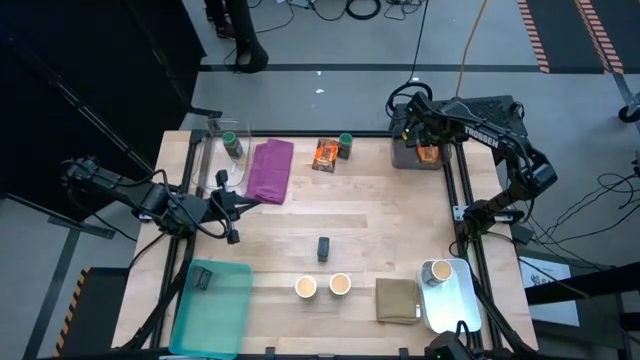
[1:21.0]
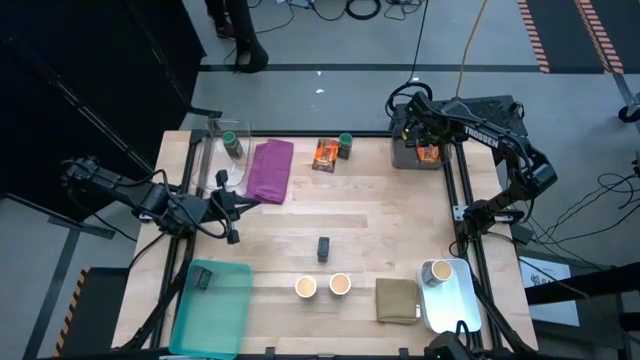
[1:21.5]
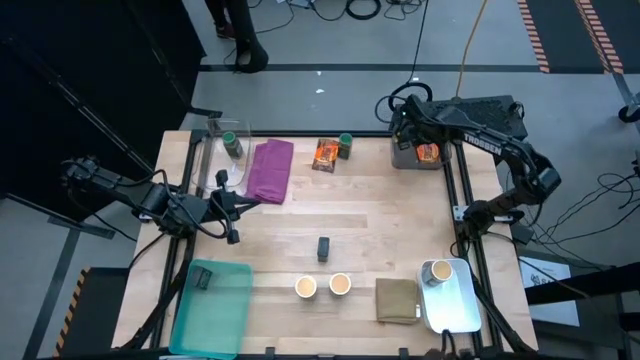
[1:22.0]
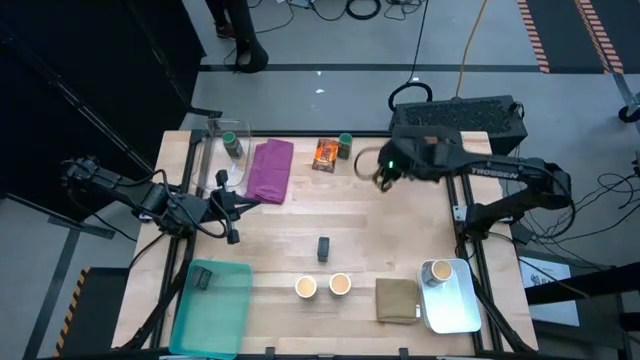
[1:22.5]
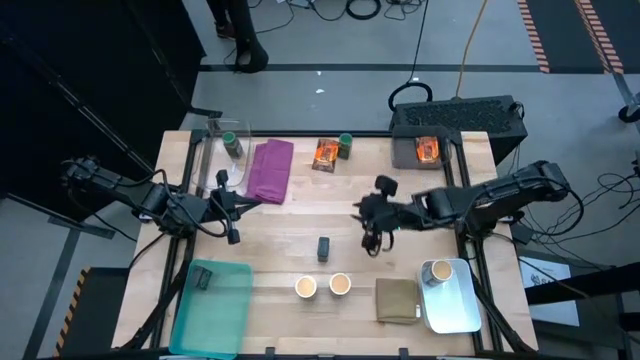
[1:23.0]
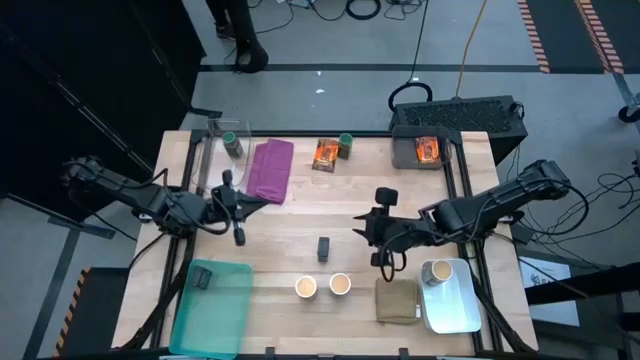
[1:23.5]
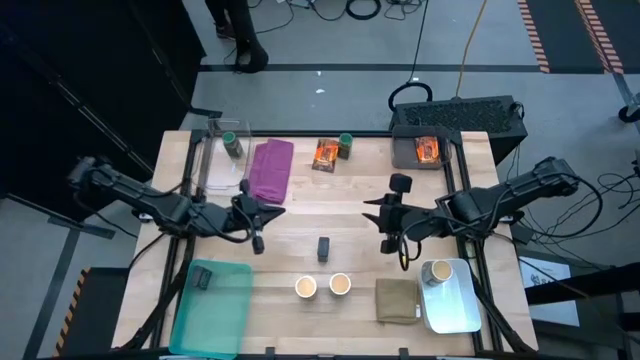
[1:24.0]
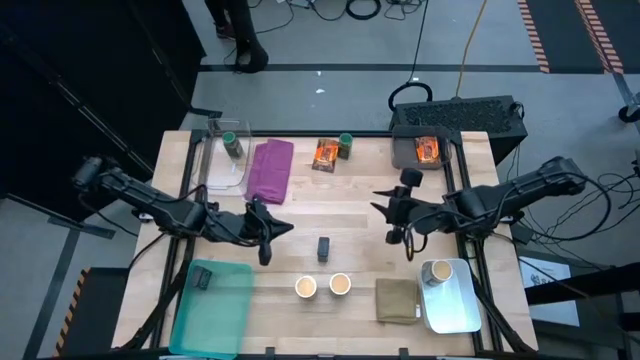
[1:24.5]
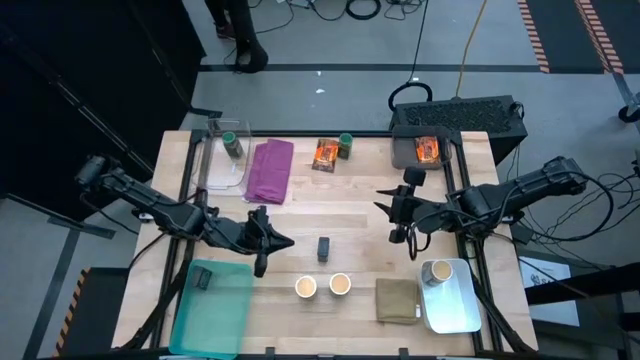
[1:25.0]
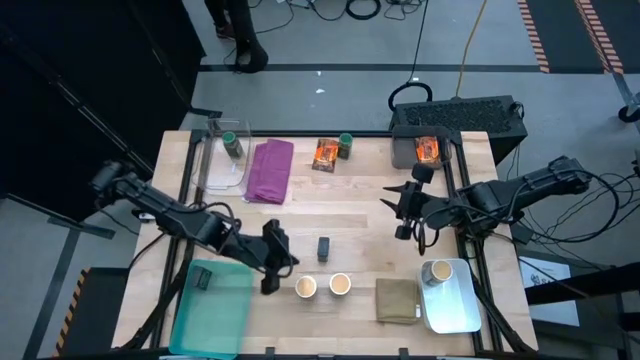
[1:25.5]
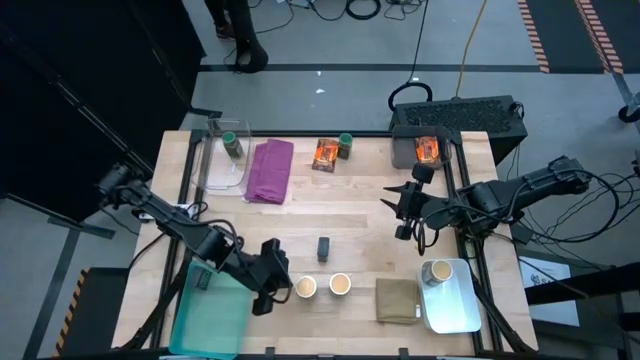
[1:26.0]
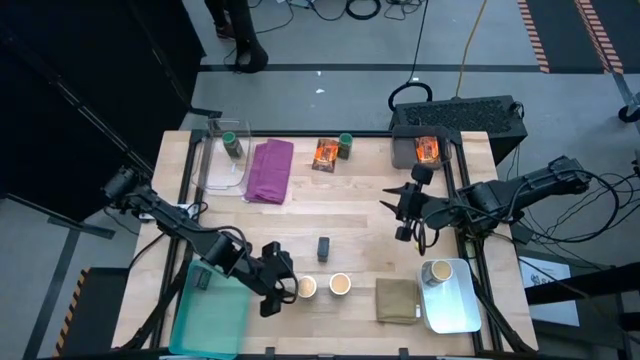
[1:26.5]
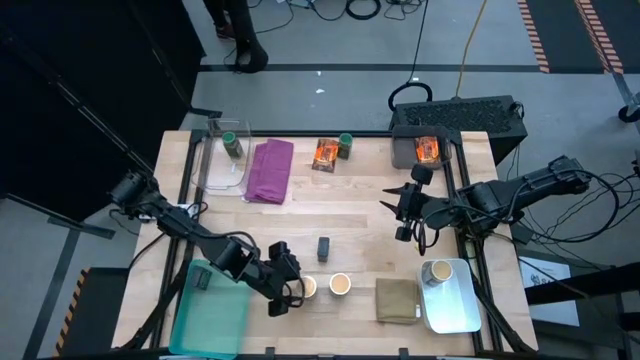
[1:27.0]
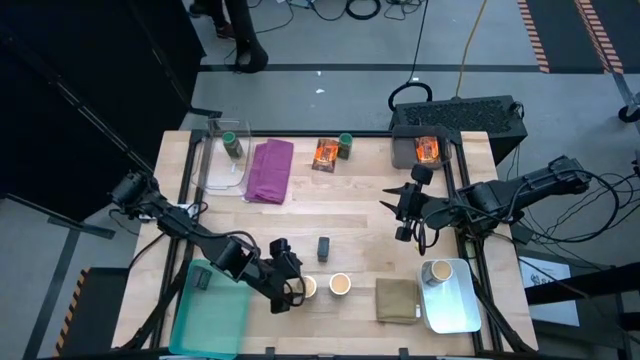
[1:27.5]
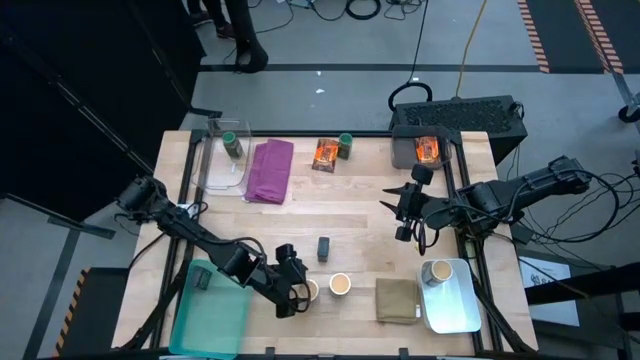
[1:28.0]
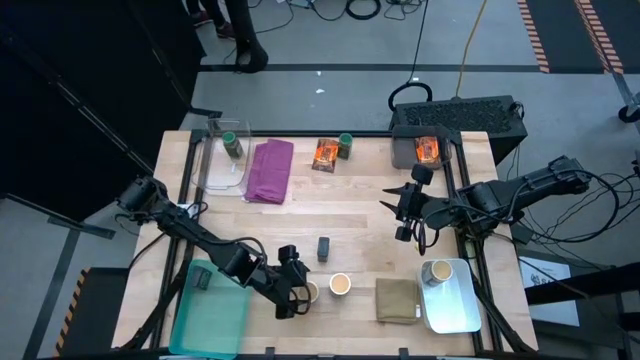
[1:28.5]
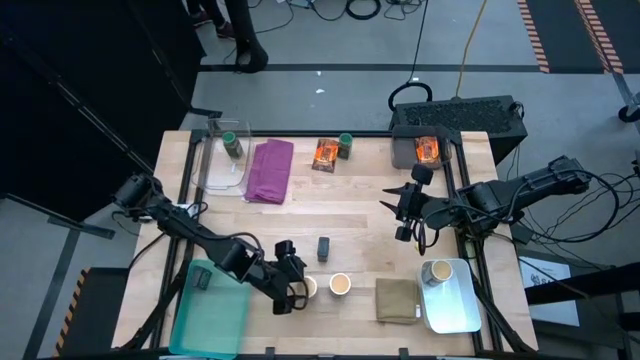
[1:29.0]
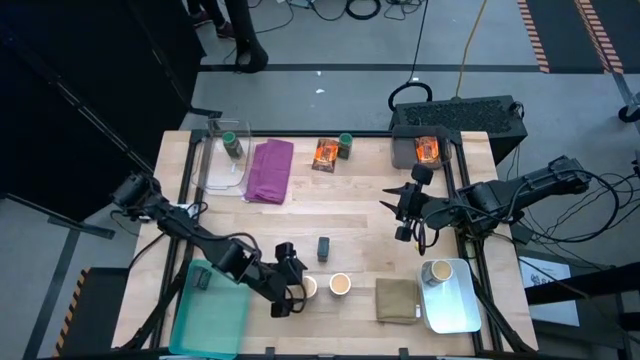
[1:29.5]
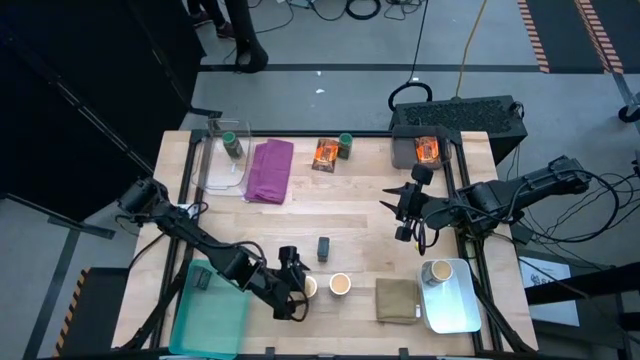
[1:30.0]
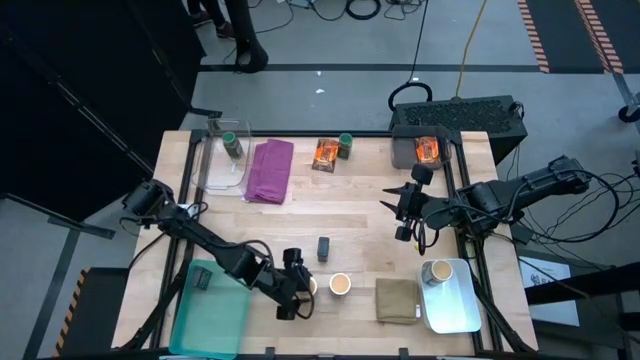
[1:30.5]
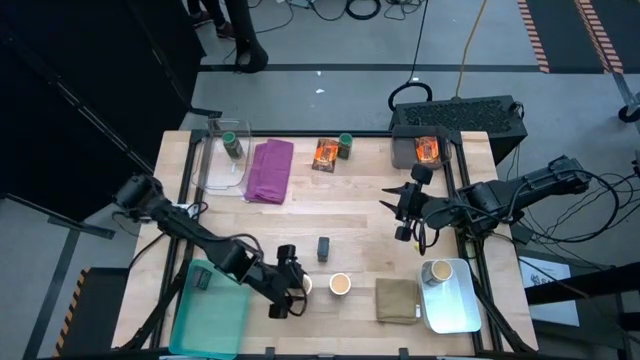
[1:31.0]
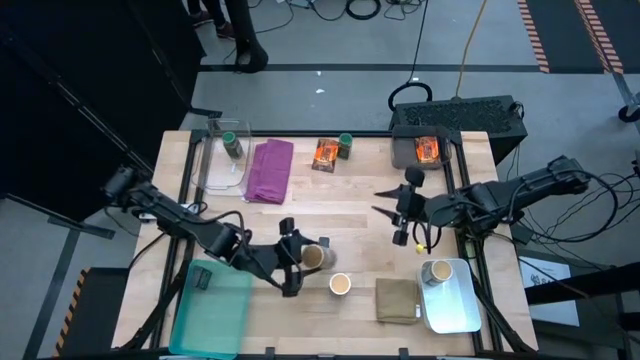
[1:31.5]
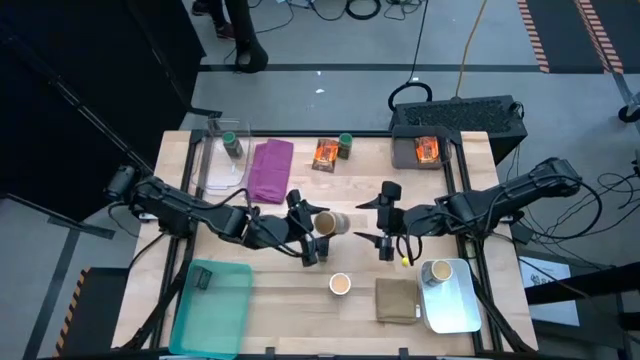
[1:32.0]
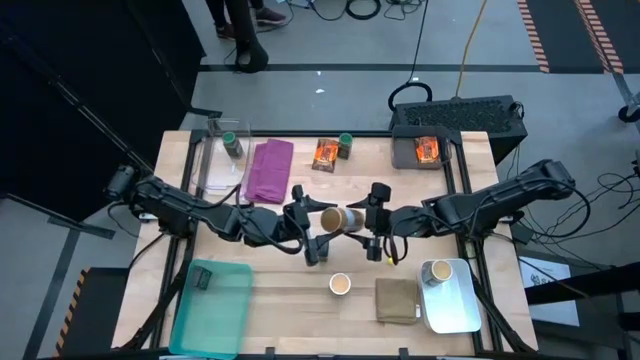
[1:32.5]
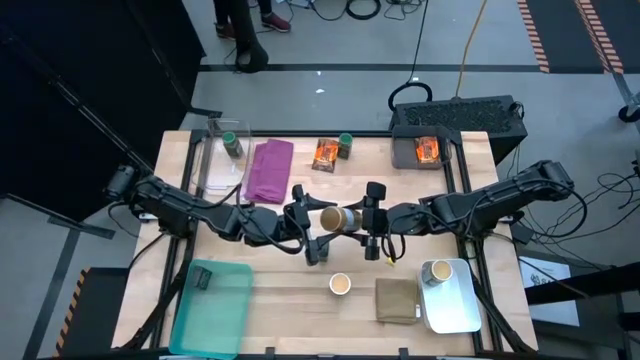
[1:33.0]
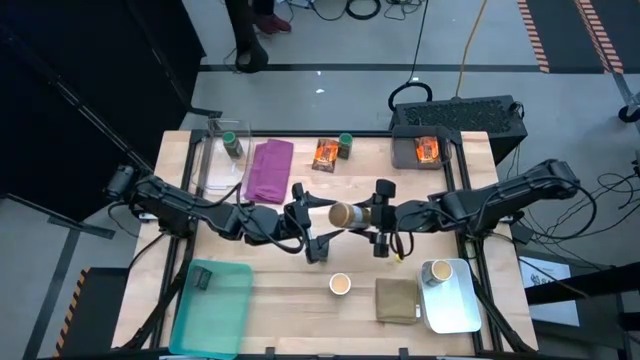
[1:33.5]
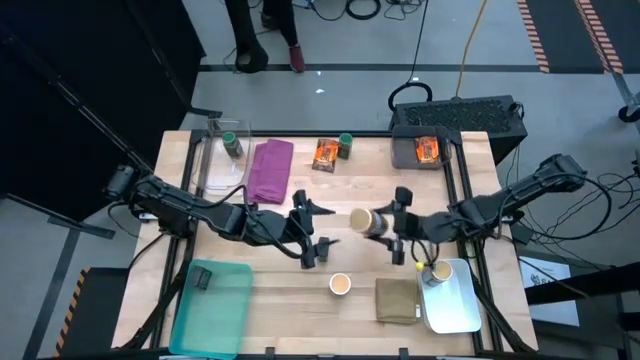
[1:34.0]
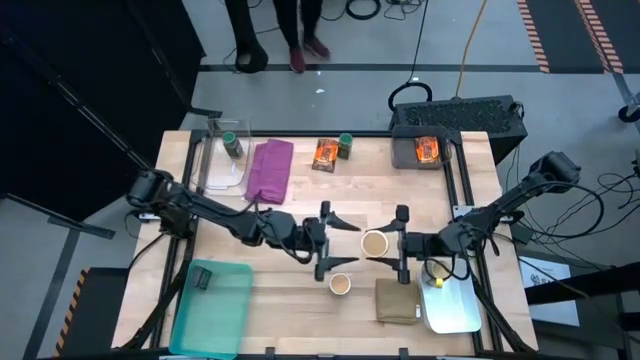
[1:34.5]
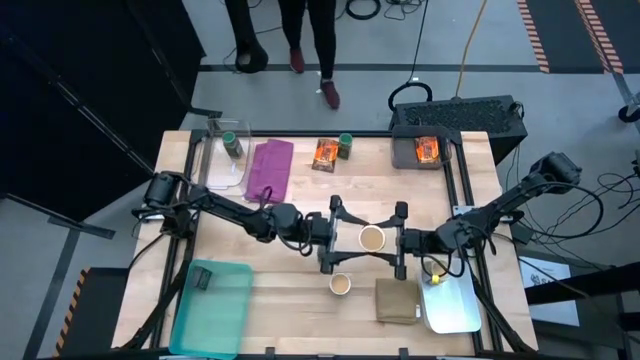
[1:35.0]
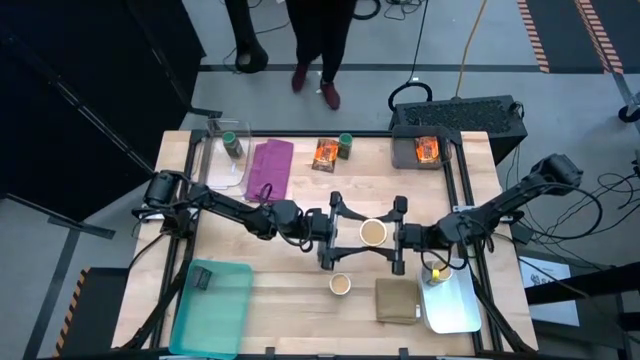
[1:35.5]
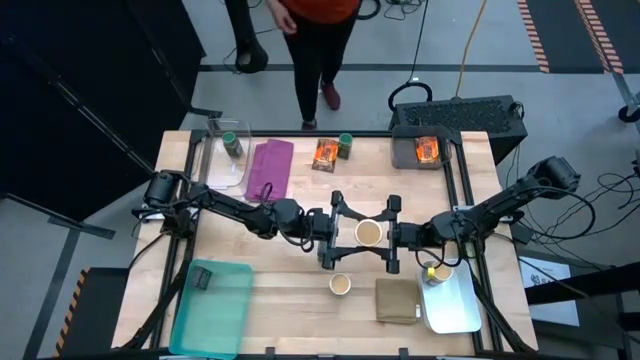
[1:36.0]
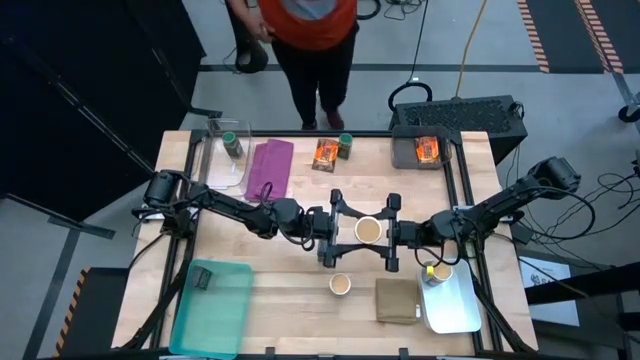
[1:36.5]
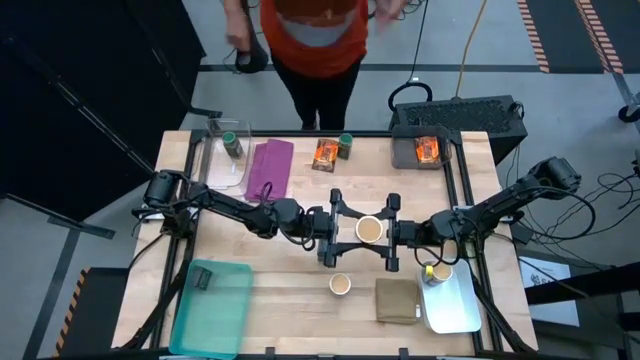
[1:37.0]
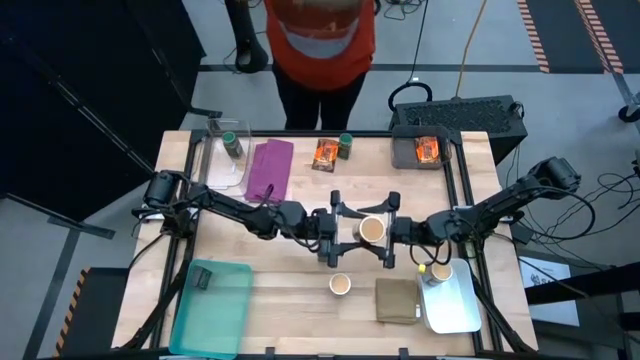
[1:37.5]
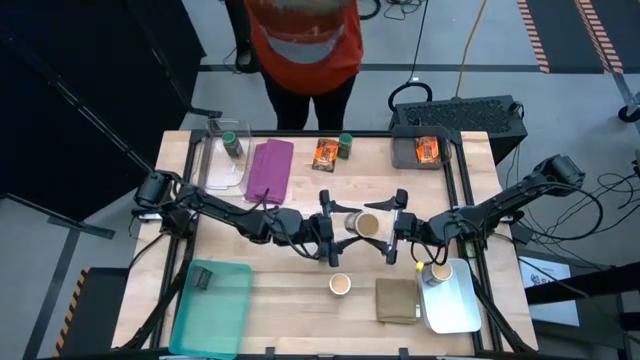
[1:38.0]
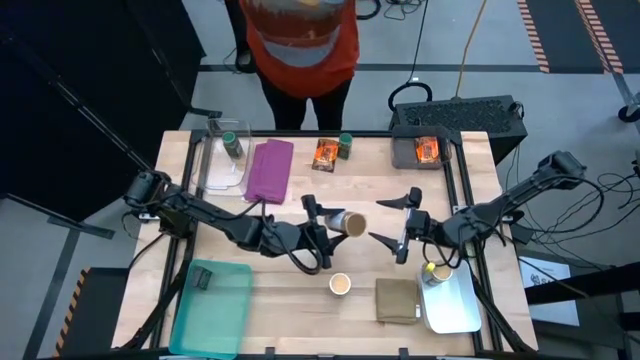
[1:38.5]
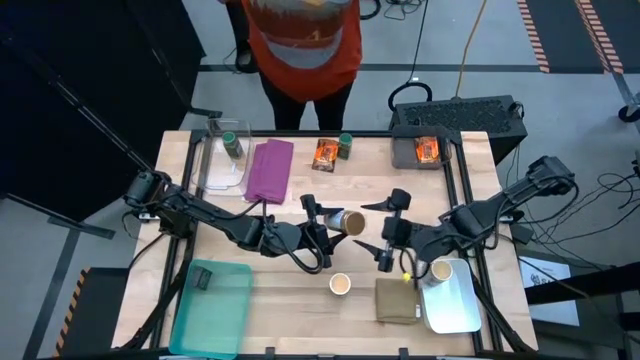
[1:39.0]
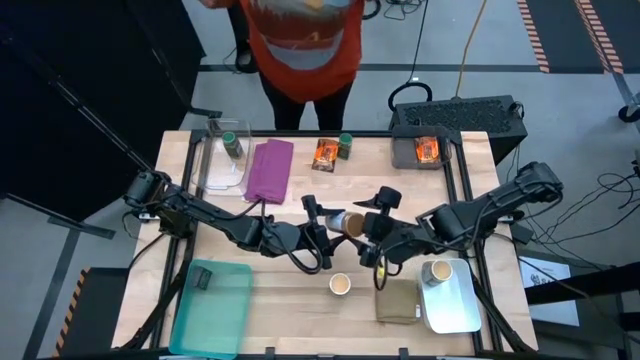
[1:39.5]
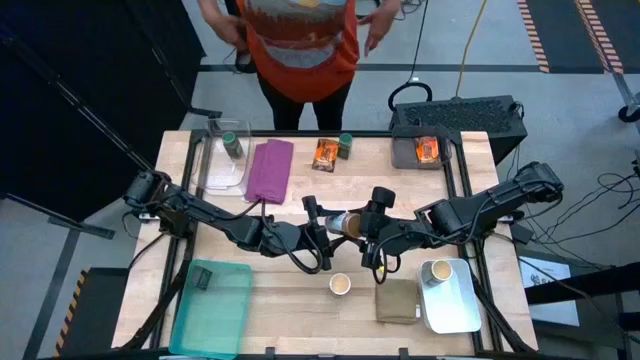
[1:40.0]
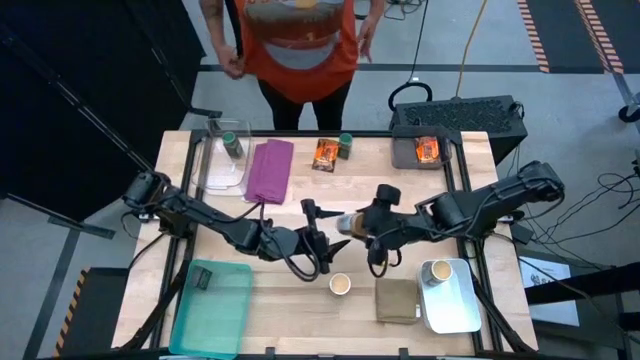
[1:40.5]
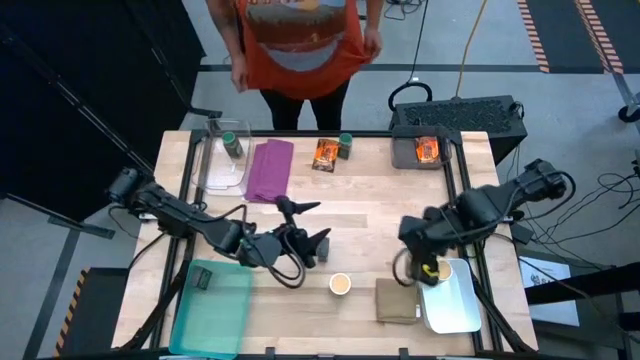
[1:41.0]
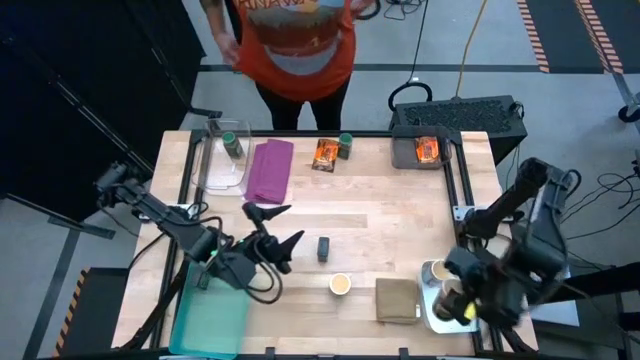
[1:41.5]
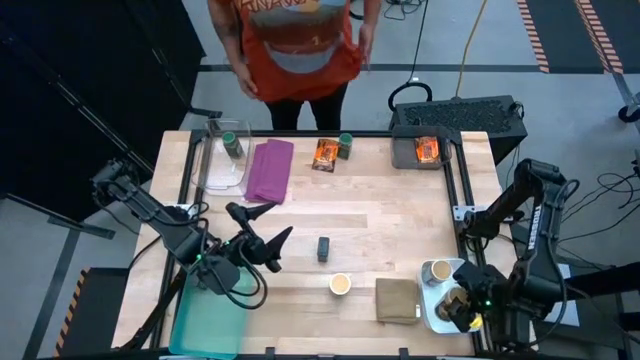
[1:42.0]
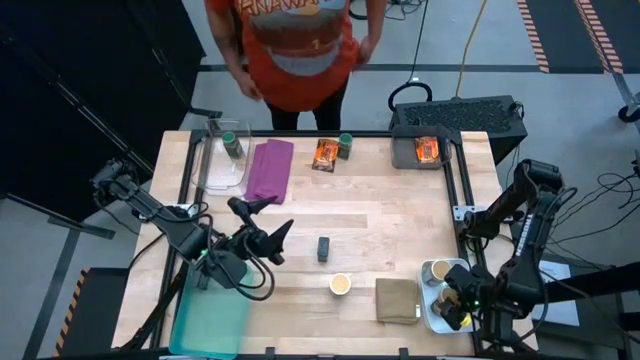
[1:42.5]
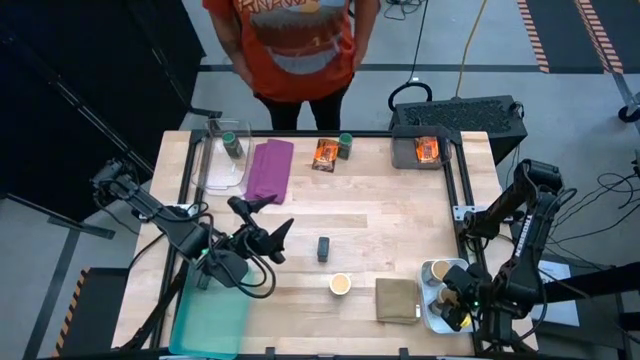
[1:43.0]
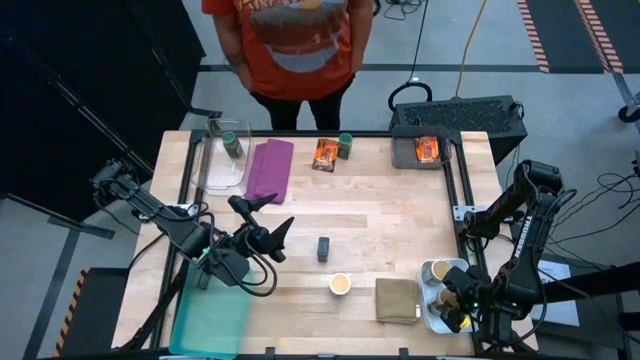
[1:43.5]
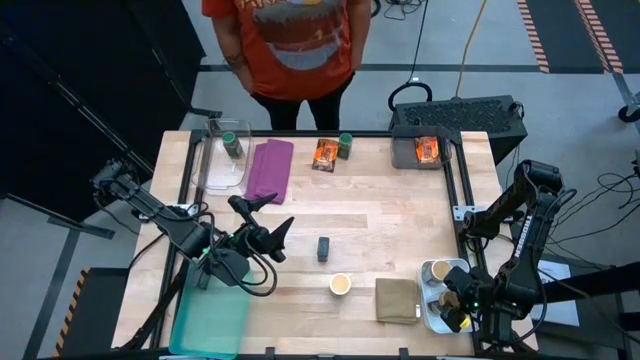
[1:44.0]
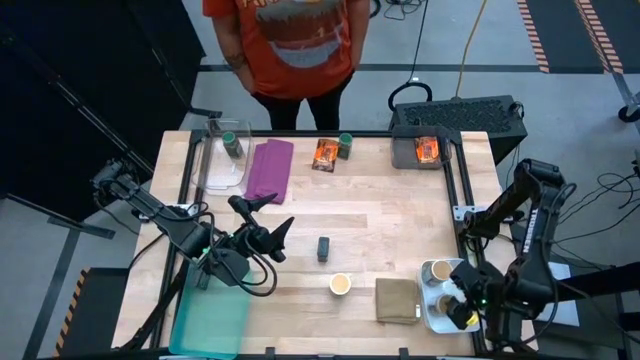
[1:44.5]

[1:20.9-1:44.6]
Task: Sort spices by type
Put the left golden seasoning bottle into the white bin
